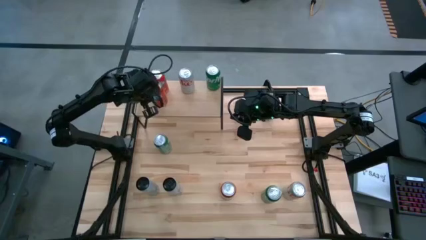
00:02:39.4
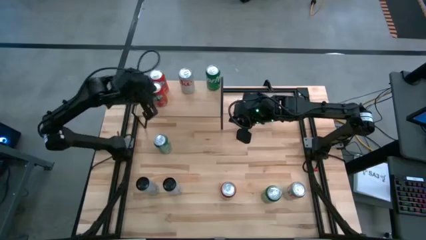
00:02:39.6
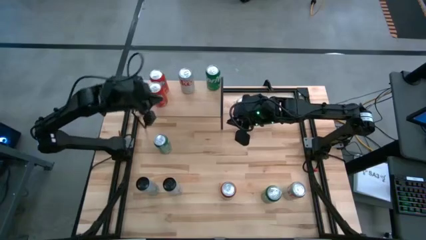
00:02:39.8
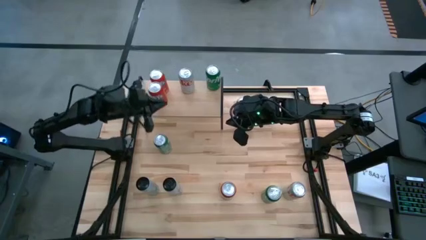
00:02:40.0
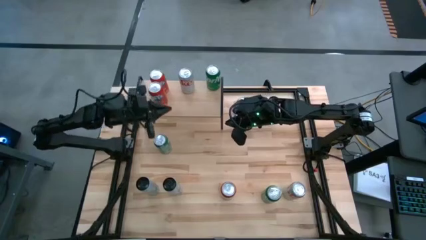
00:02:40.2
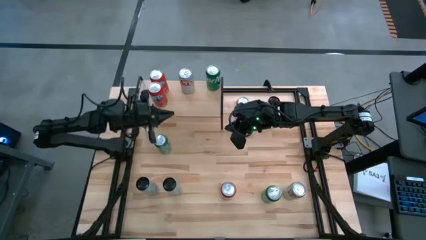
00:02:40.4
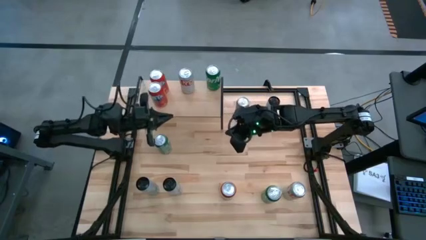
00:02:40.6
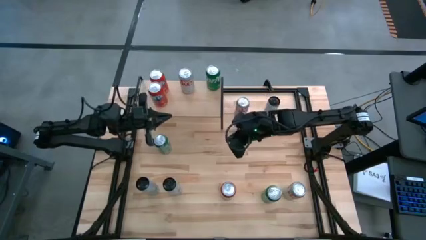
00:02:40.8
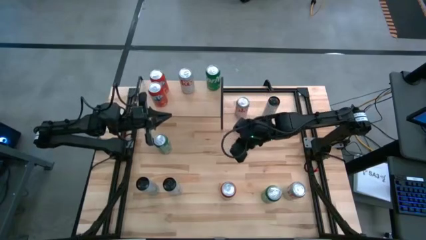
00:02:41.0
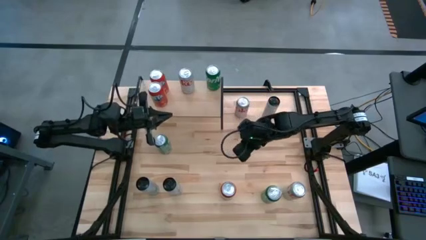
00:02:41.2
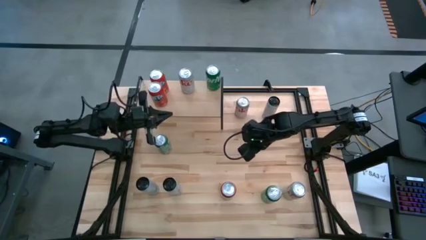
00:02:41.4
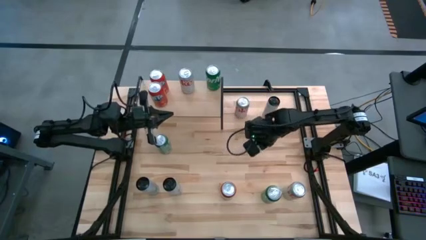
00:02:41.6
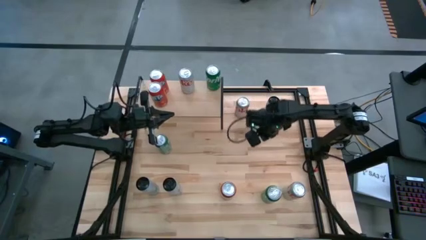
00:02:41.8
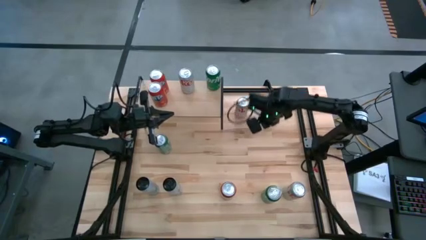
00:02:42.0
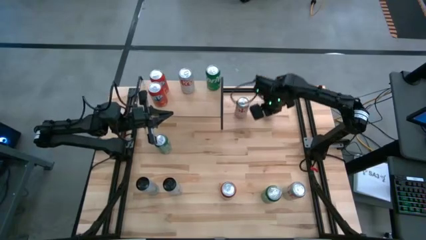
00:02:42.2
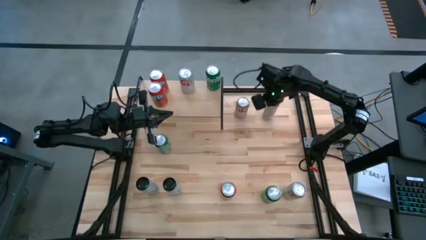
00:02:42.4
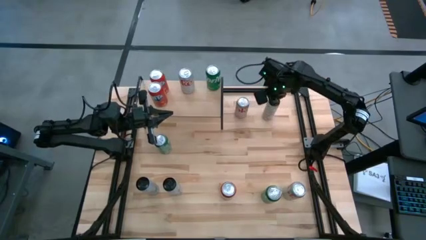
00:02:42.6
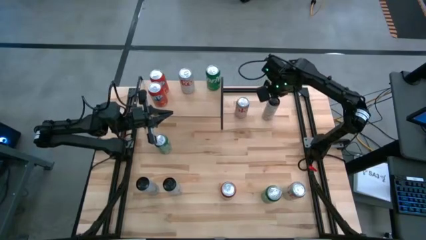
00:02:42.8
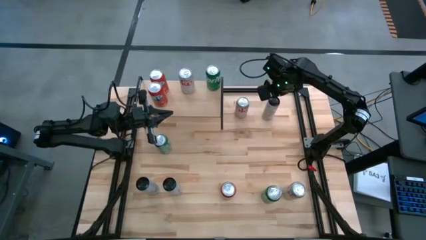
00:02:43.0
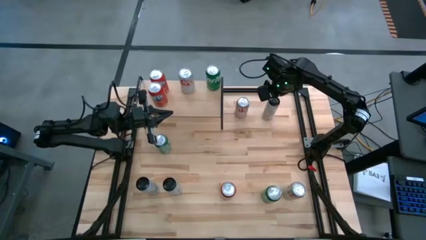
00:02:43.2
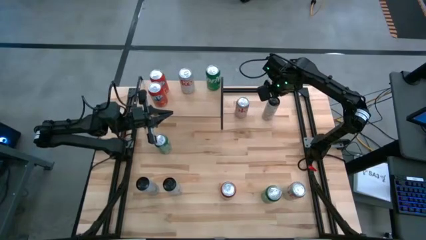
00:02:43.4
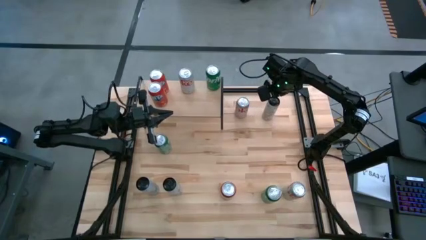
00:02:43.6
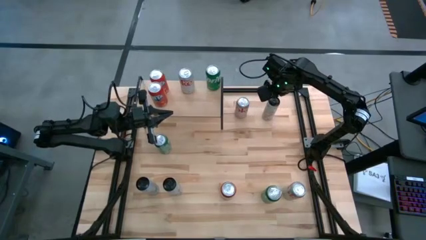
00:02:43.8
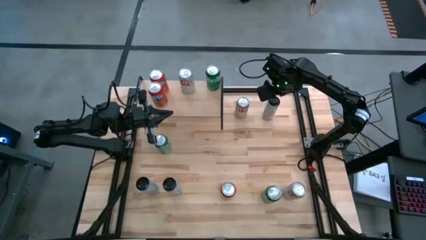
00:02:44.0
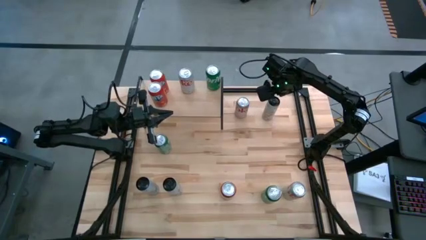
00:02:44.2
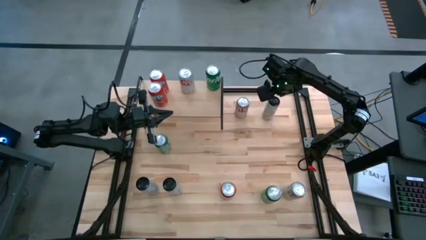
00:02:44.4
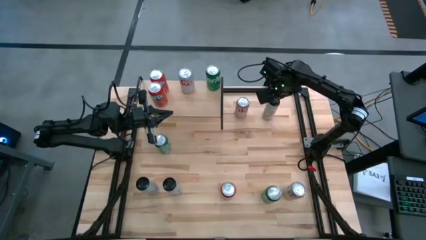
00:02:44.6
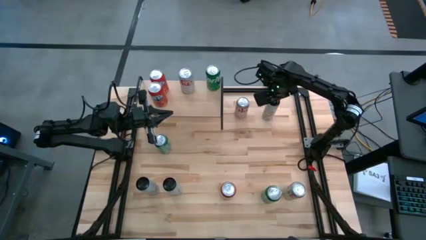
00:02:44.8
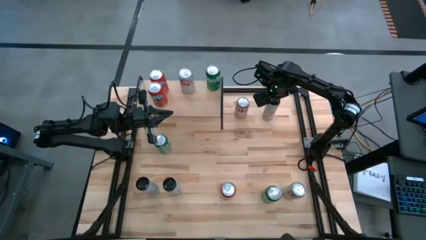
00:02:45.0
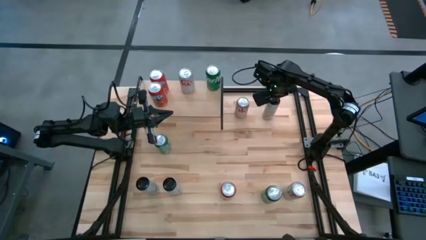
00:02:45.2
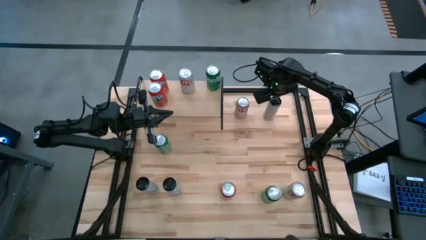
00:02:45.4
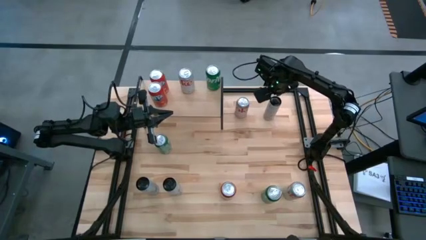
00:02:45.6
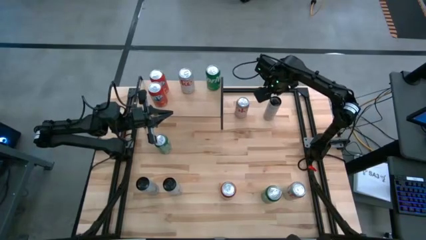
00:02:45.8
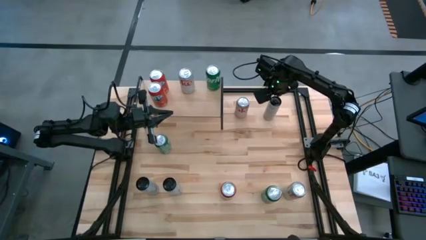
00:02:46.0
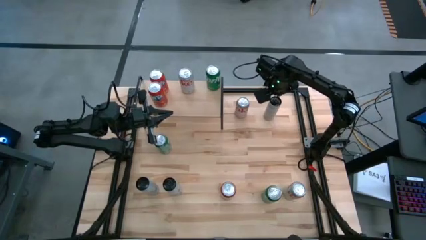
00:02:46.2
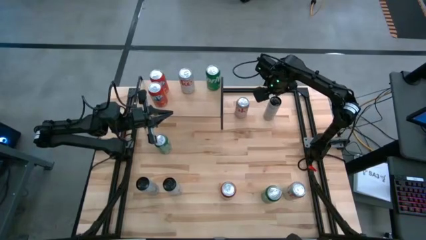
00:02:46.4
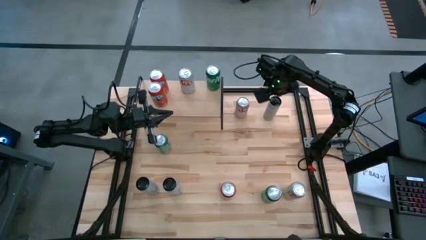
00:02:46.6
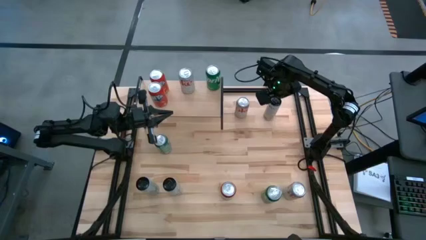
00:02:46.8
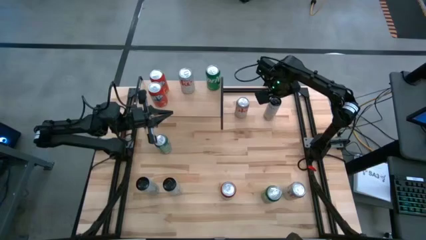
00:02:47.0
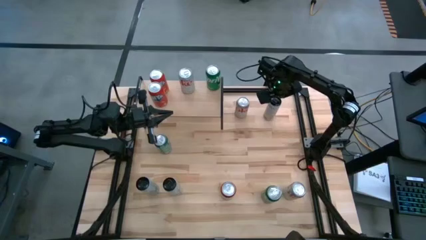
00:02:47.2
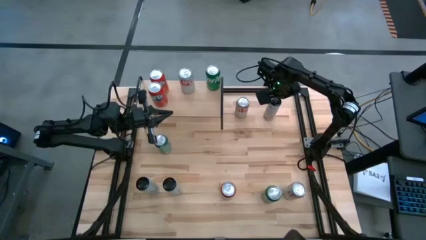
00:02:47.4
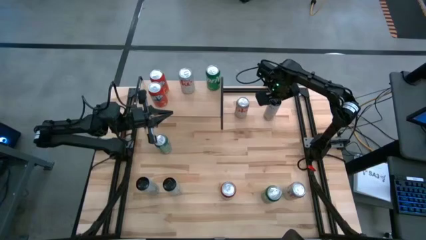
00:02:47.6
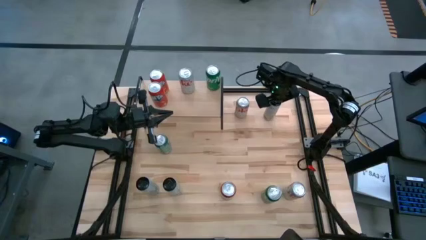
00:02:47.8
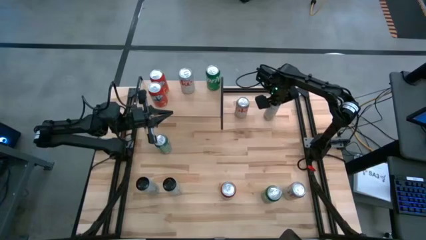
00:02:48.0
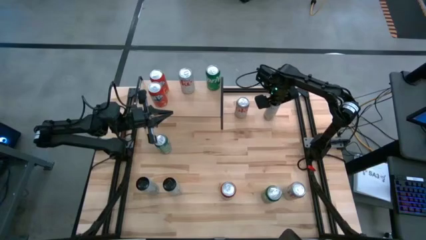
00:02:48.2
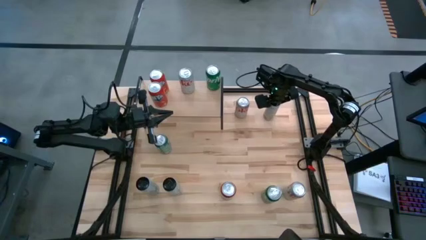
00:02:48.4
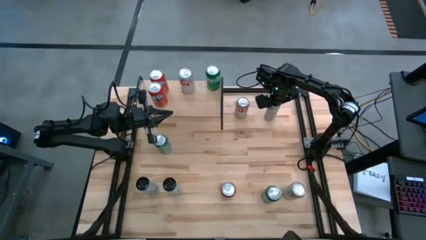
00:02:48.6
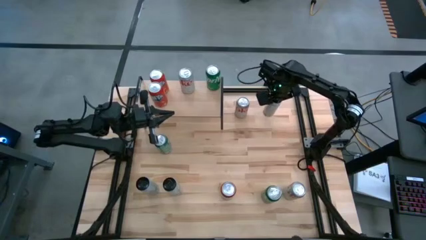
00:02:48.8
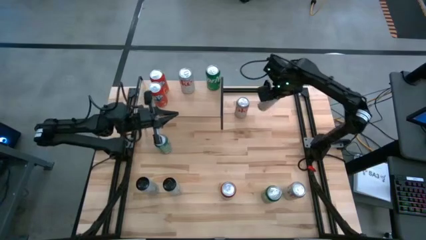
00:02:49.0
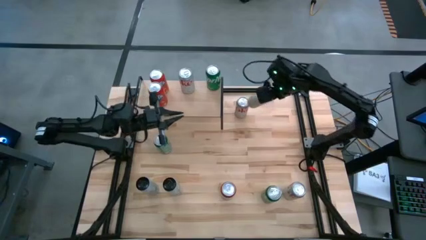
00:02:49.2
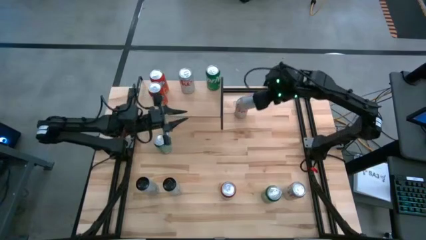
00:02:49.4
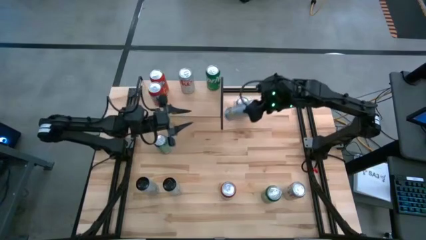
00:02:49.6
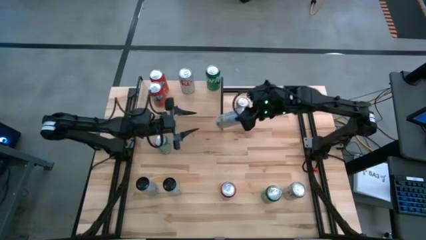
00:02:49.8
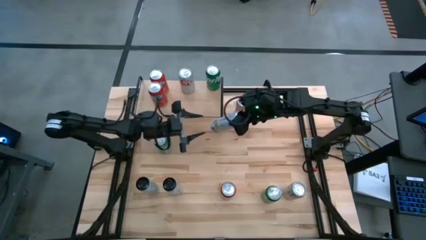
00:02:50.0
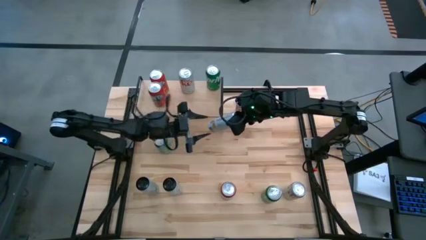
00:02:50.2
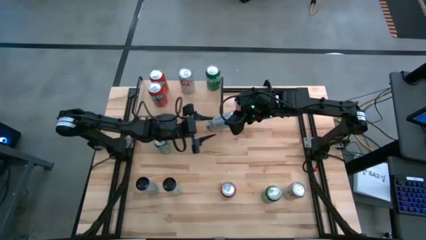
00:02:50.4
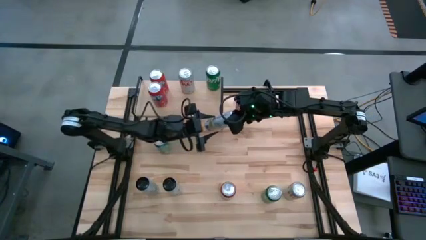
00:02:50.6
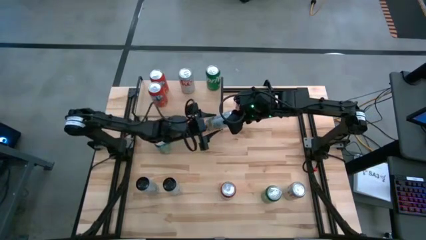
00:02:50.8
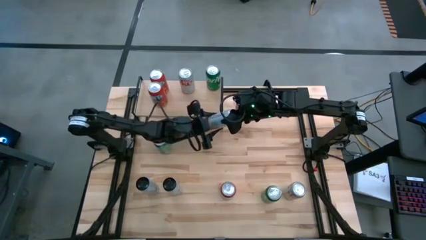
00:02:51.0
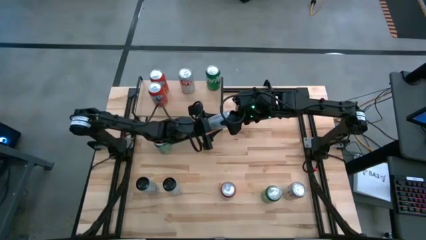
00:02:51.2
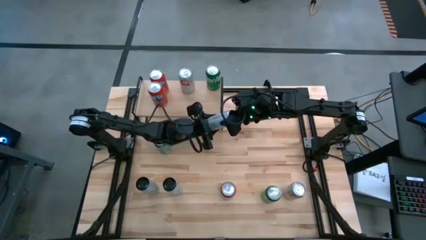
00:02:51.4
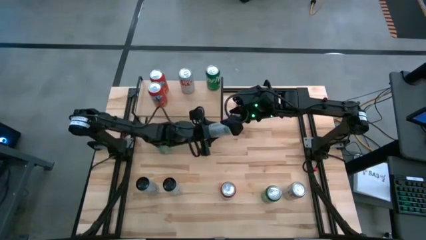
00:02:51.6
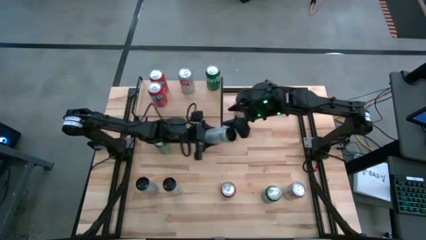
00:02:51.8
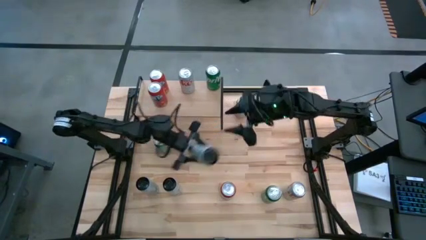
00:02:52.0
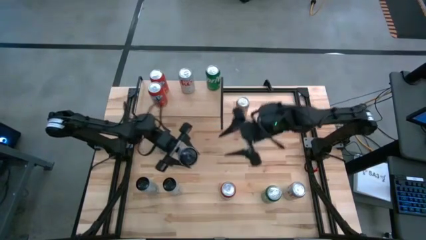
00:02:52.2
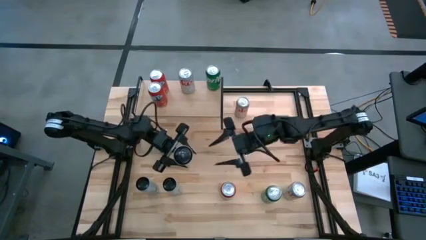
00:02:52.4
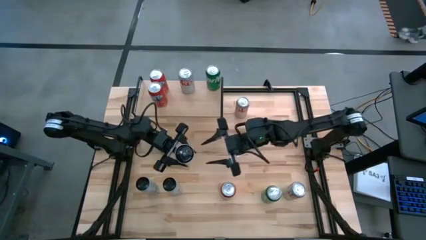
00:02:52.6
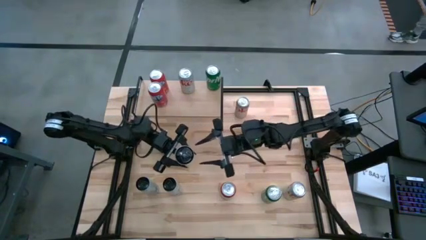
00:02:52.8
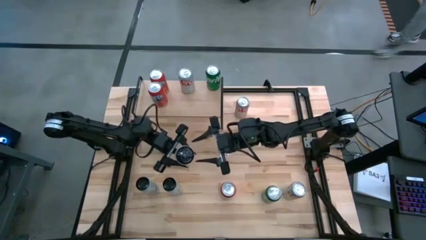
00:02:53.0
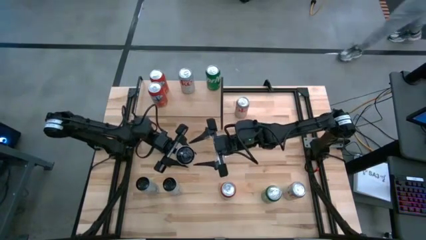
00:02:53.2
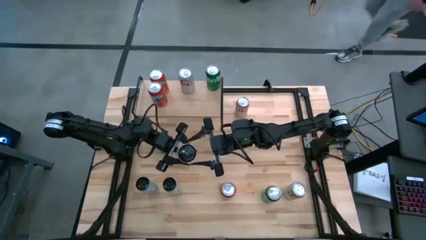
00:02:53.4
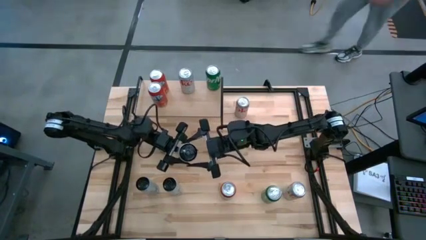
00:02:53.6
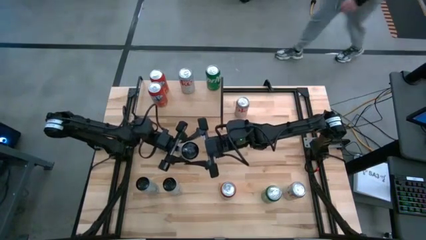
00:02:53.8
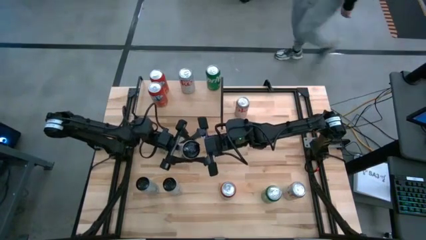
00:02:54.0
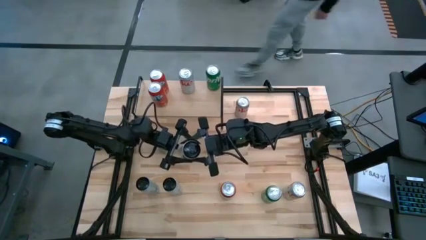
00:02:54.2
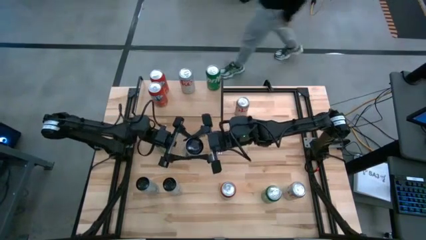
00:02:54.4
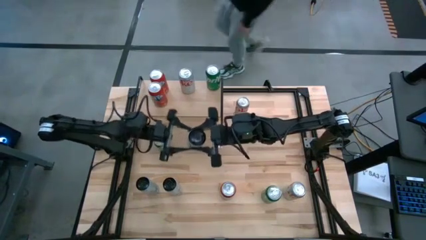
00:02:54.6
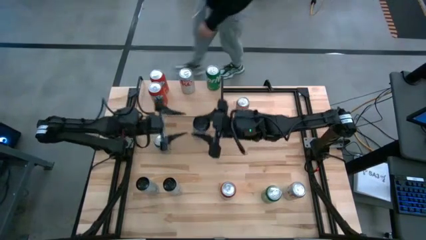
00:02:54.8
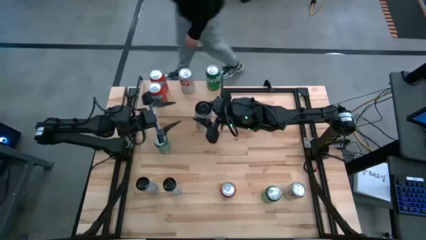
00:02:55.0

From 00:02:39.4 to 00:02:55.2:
Task: Place canned beverage on shelf
Put the white and yellow soda can on the shelf
